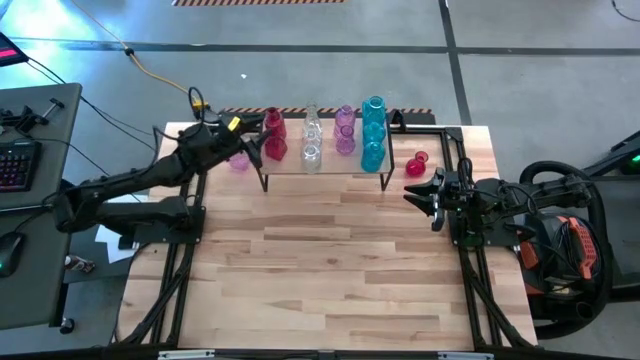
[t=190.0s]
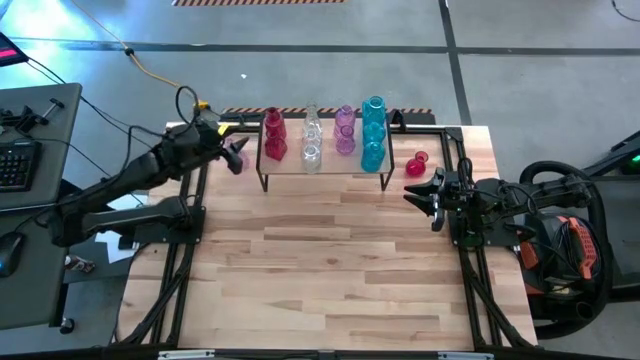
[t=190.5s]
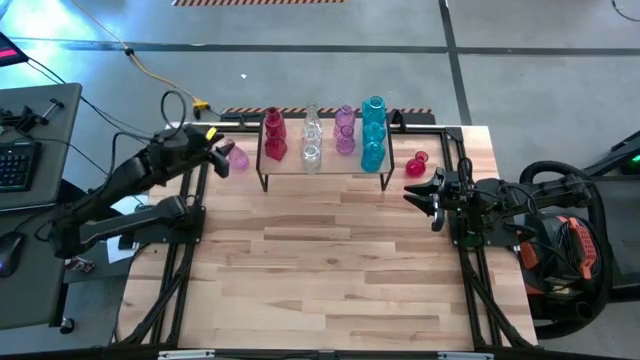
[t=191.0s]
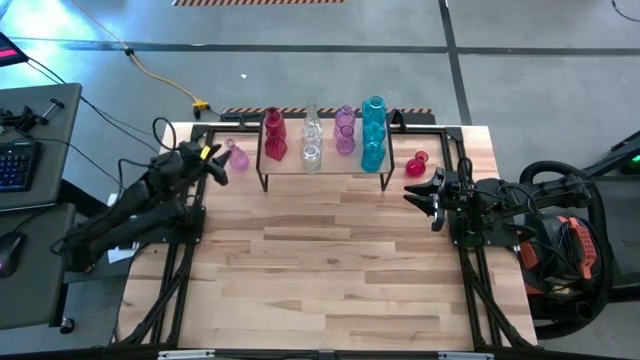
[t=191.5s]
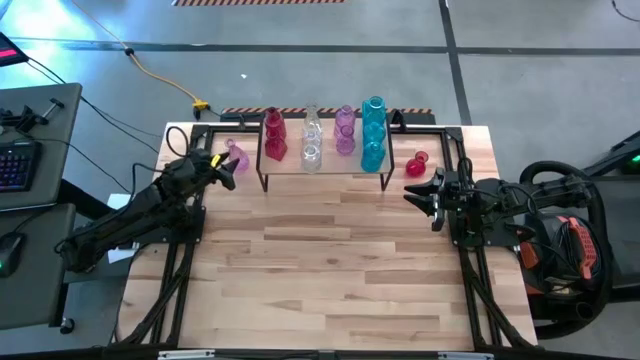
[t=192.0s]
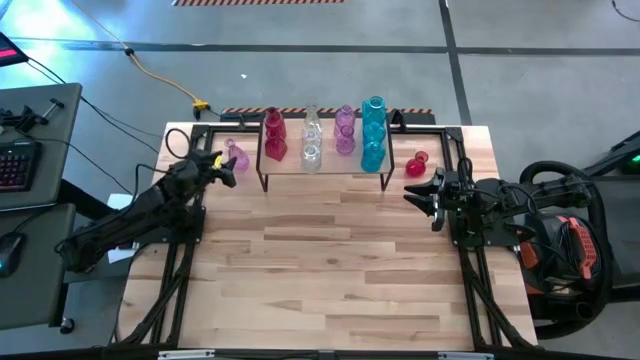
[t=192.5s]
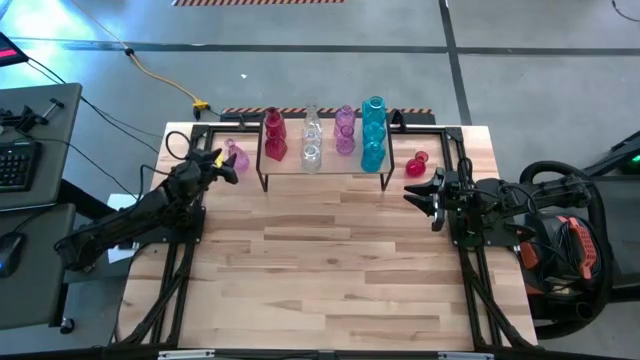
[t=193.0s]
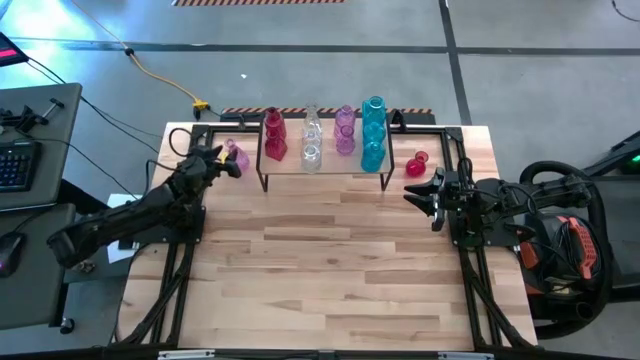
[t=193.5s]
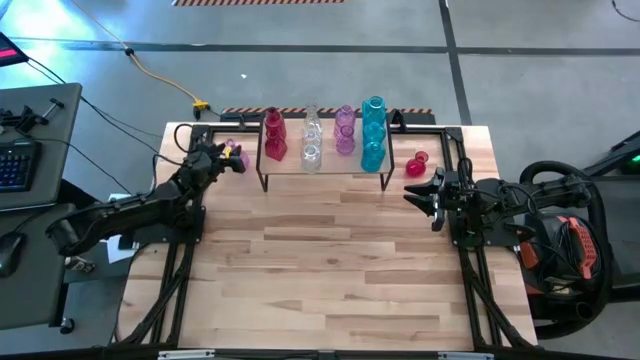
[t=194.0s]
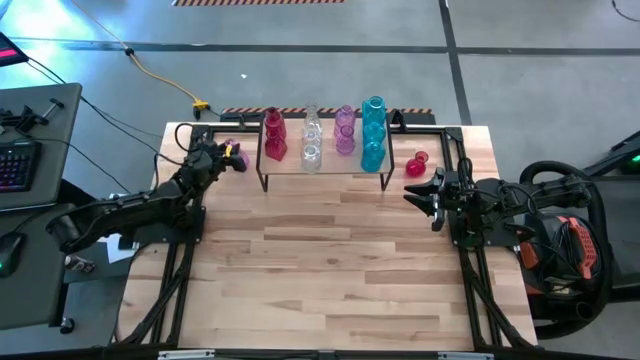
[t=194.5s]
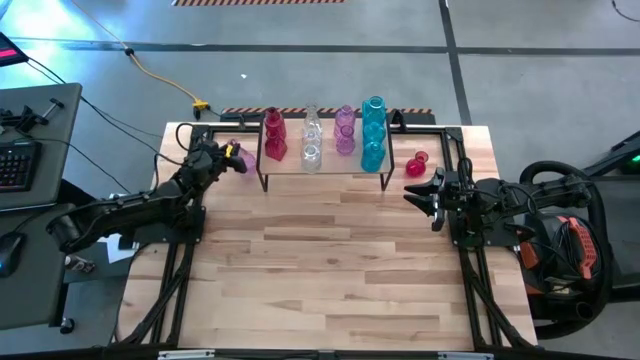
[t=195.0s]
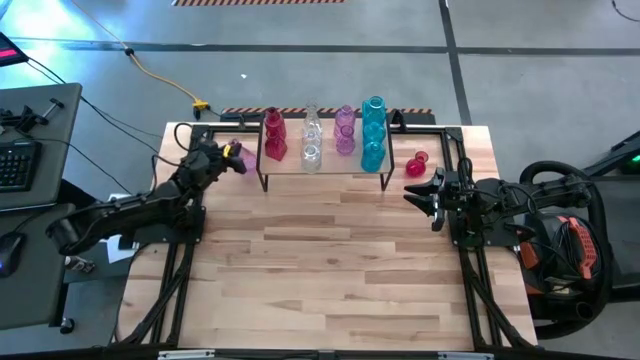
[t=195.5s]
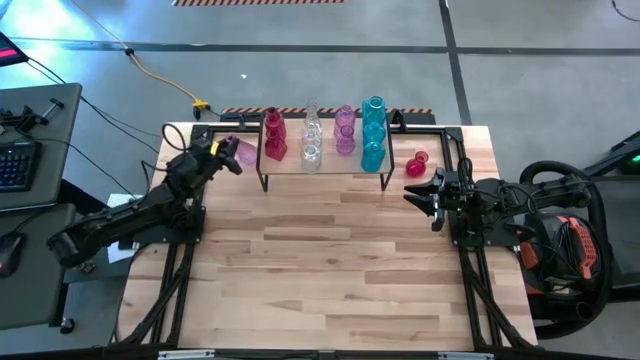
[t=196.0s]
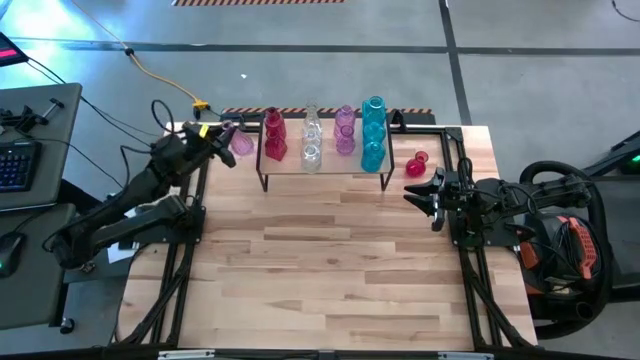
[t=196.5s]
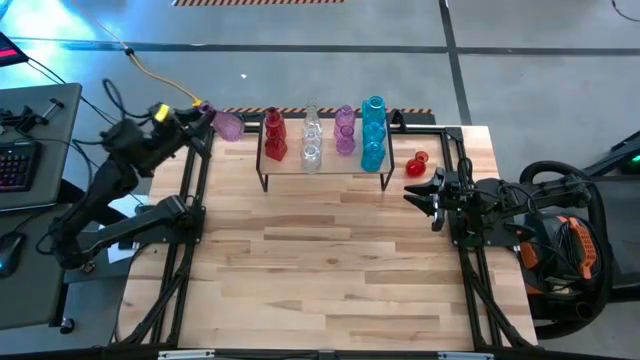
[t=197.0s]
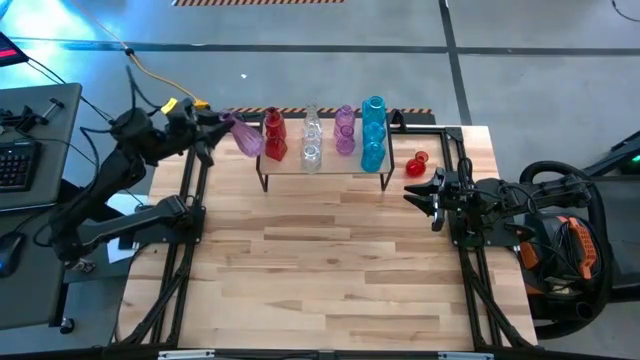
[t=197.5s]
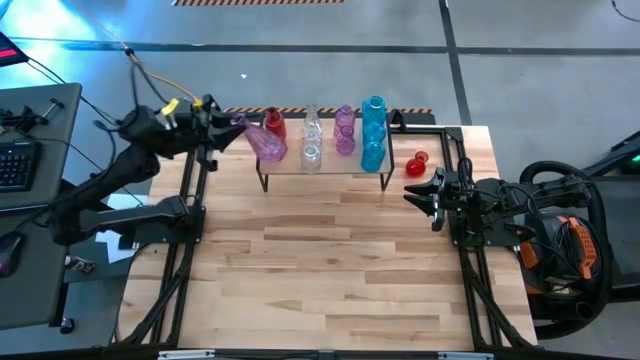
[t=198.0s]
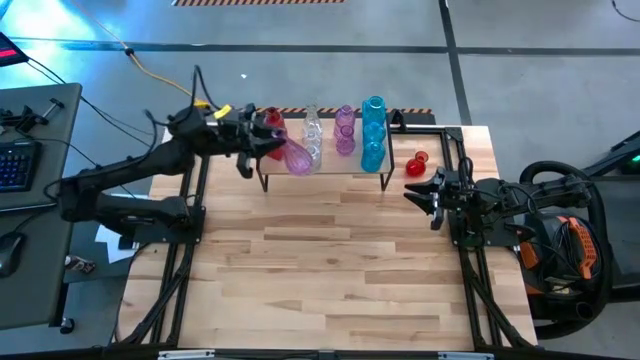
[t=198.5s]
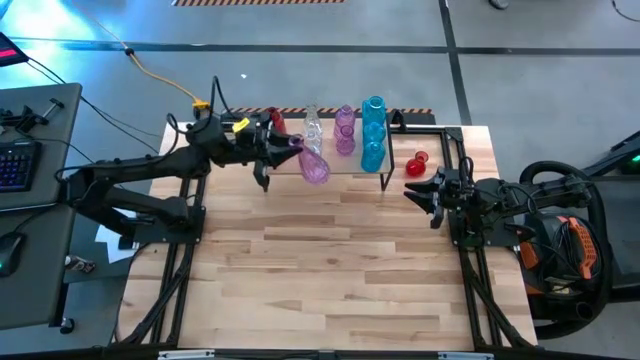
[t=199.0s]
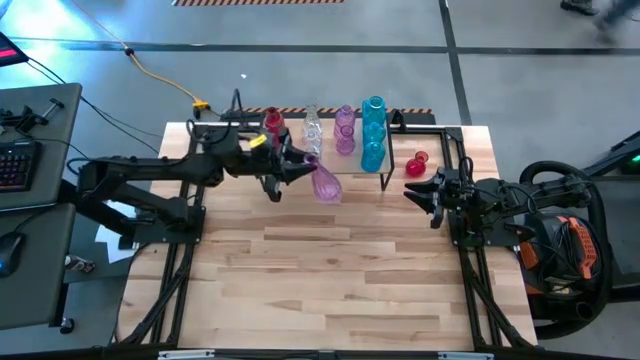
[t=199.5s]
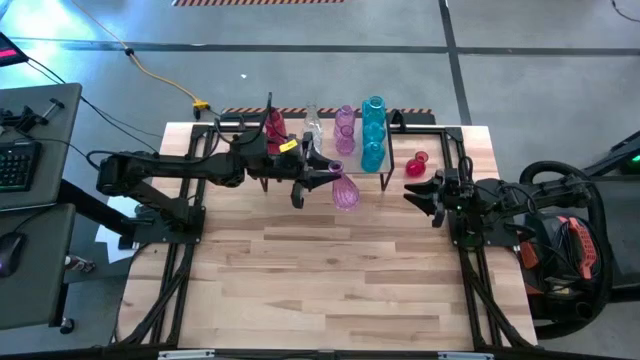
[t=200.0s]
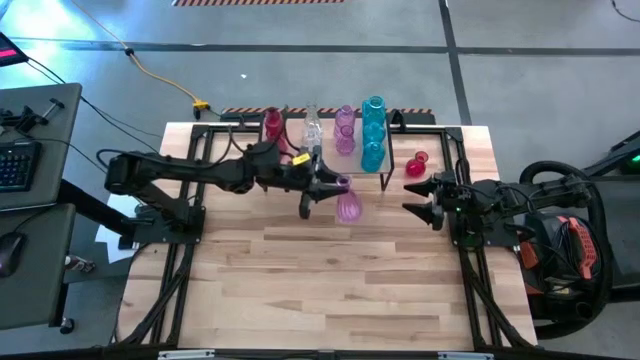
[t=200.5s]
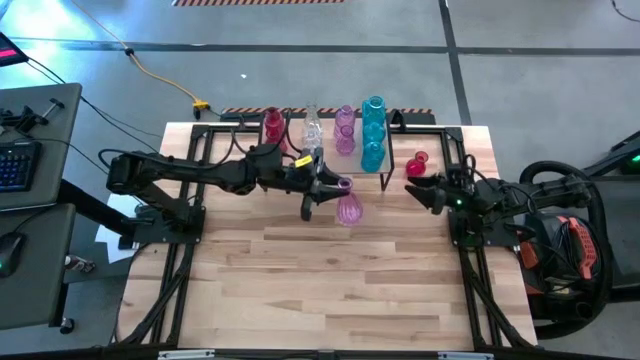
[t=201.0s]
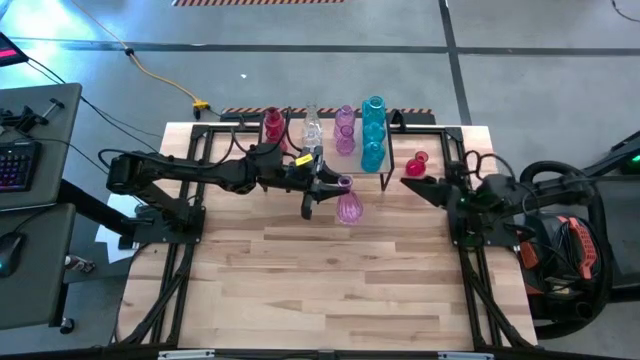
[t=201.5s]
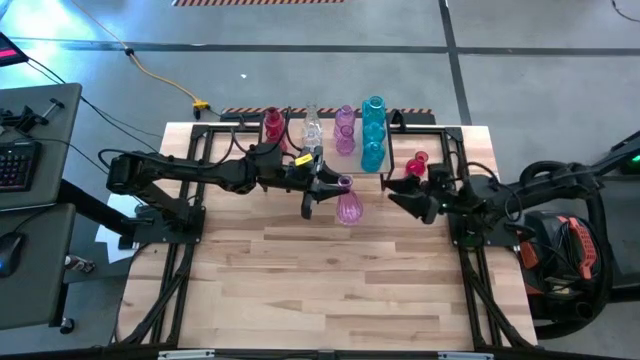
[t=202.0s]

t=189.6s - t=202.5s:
Task: sort vases onto shelf
Put the violet vase on the shelf aligned with the other violet vases

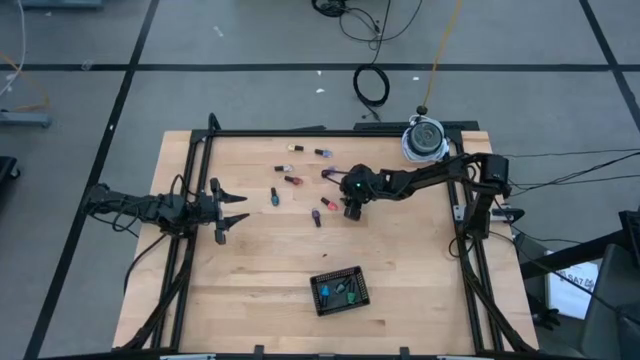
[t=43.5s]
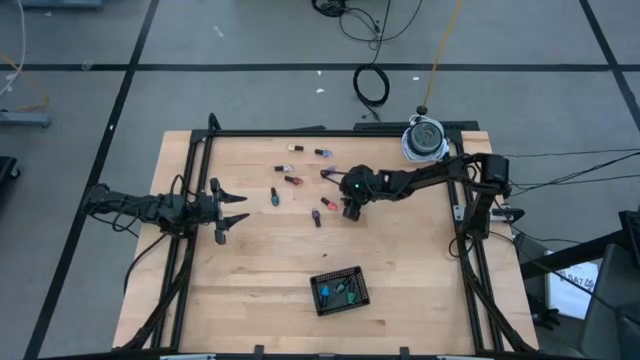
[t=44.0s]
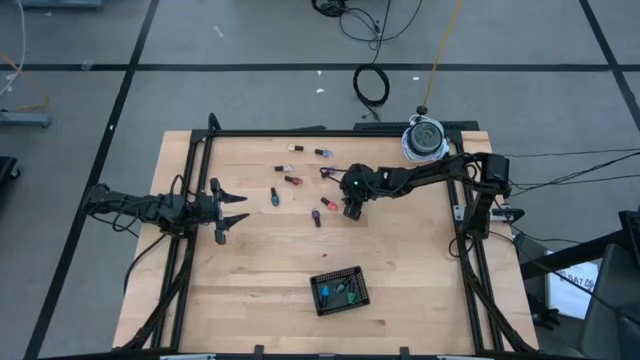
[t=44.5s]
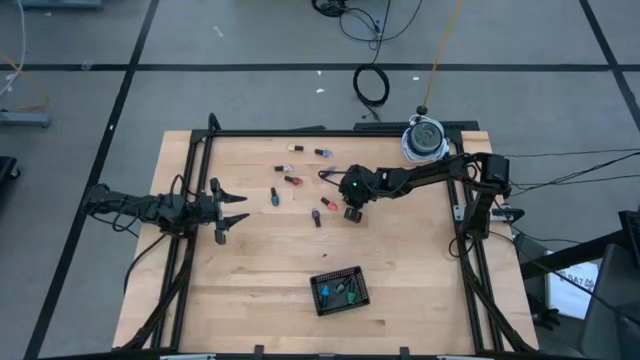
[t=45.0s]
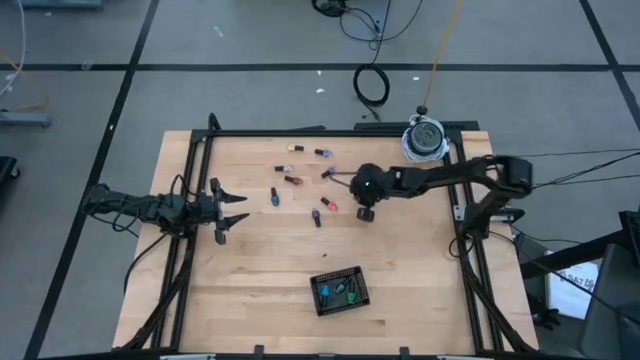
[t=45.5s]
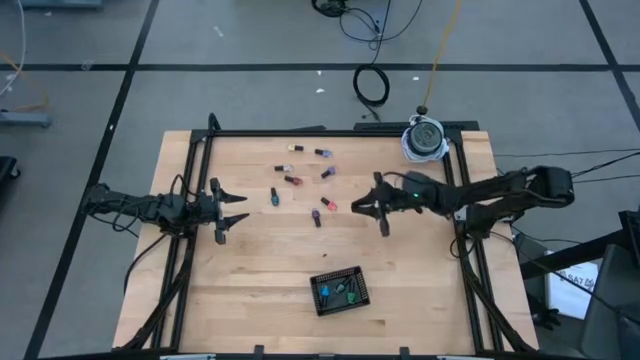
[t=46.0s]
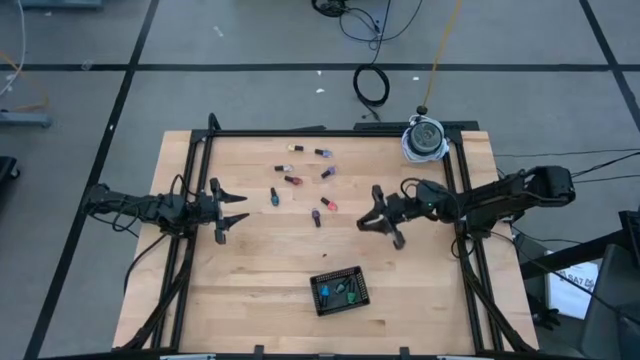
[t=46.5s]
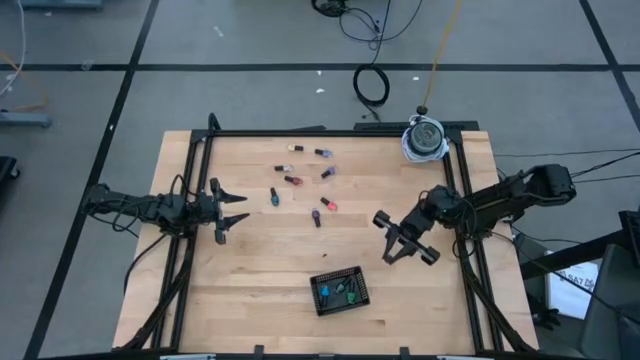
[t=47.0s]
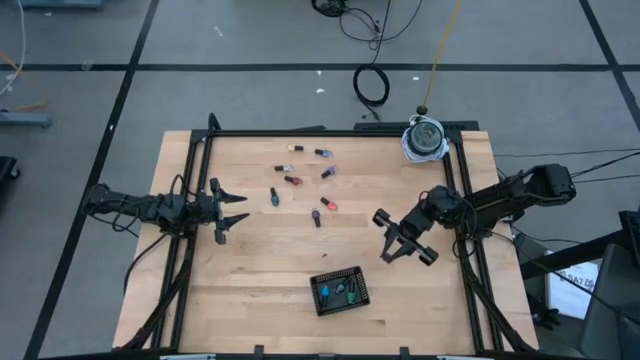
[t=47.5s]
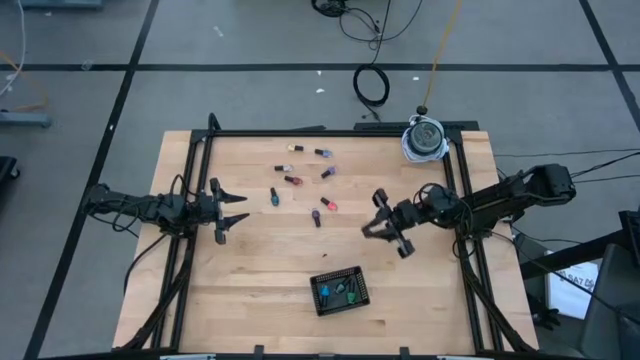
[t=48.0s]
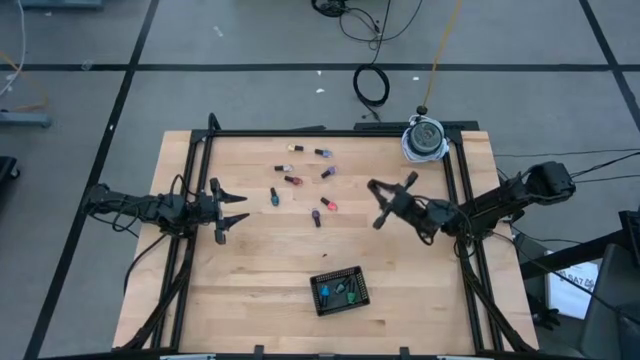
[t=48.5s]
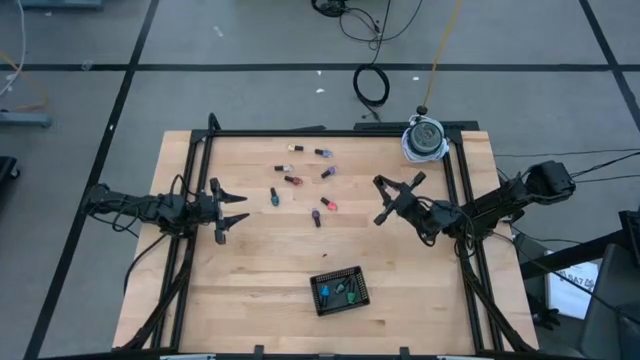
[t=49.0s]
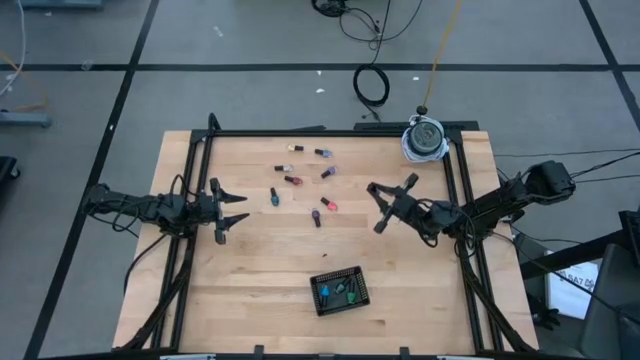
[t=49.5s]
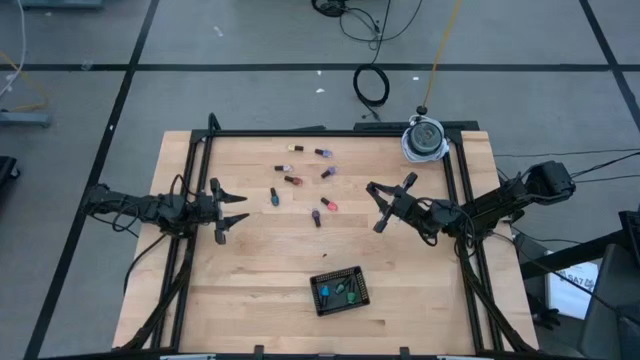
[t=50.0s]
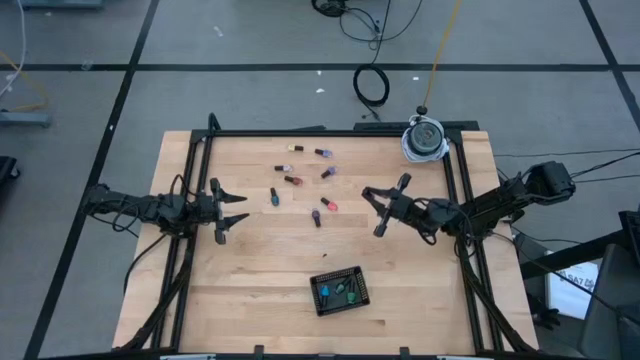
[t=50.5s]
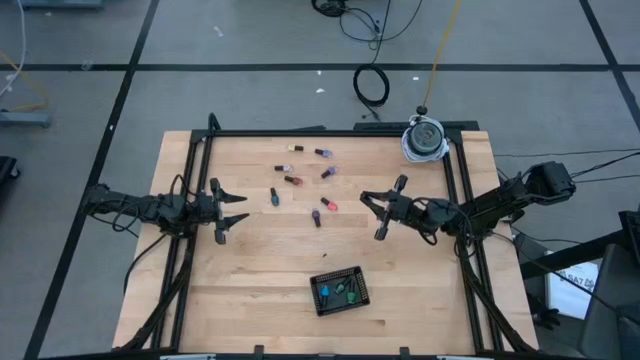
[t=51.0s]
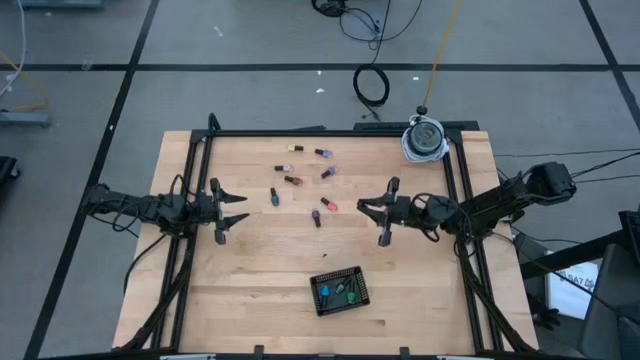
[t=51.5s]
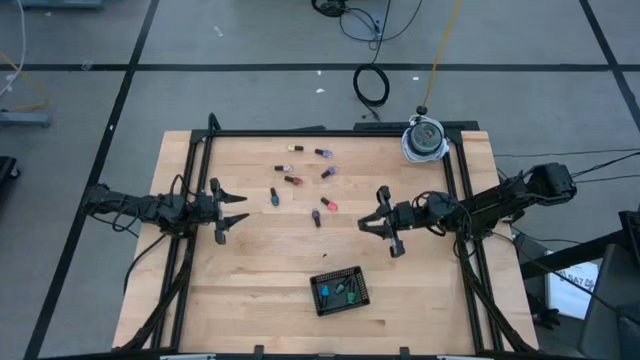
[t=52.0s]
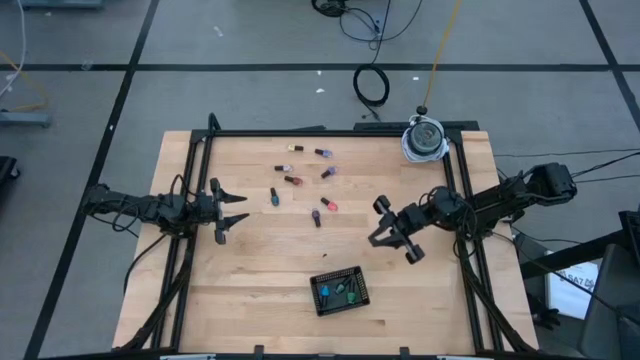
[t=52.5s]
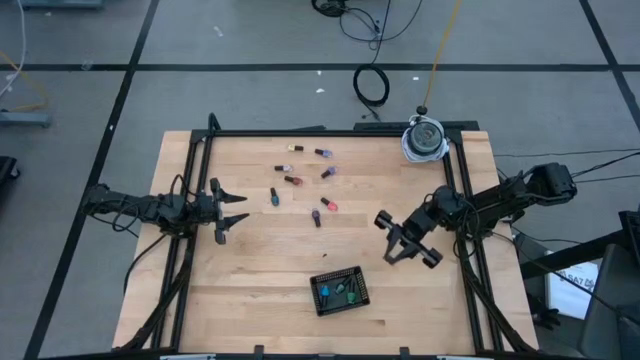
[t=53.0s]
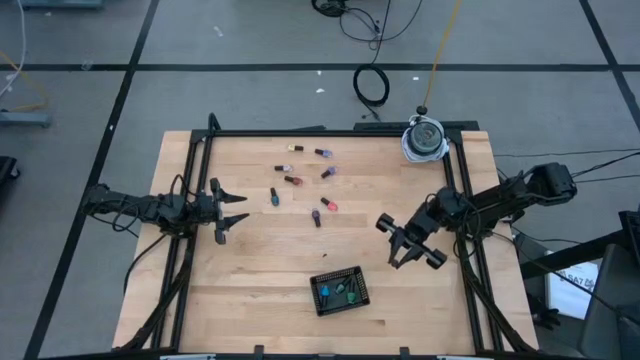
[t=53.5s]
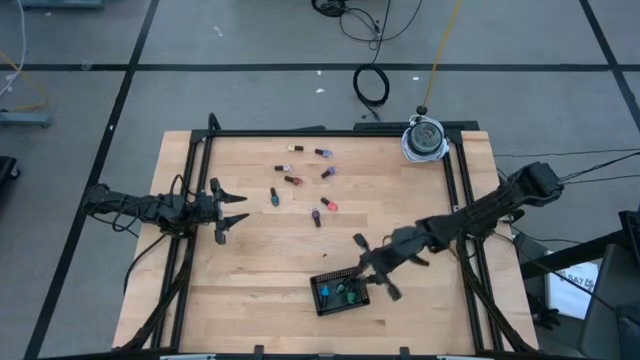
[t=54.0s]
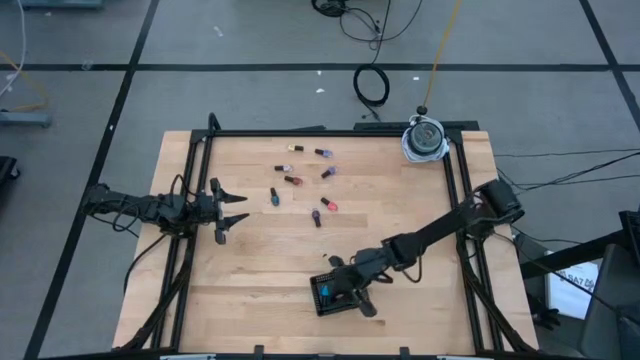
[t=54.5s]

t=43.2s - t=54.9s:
Task: Pick & Place Nail Polish
Put the light brown nail polish bottle into the black bin
